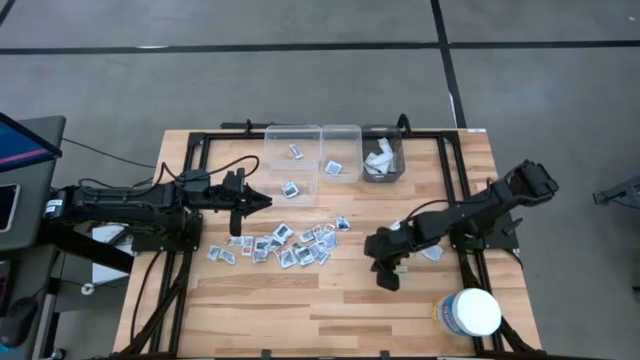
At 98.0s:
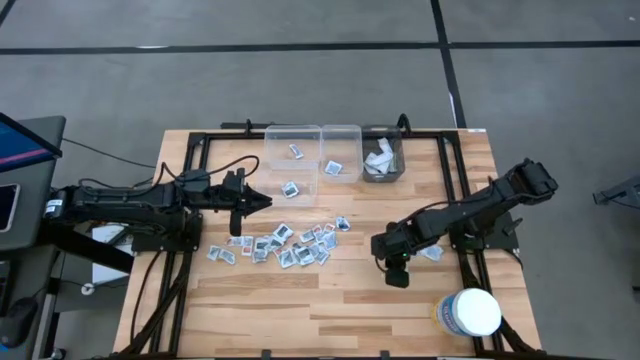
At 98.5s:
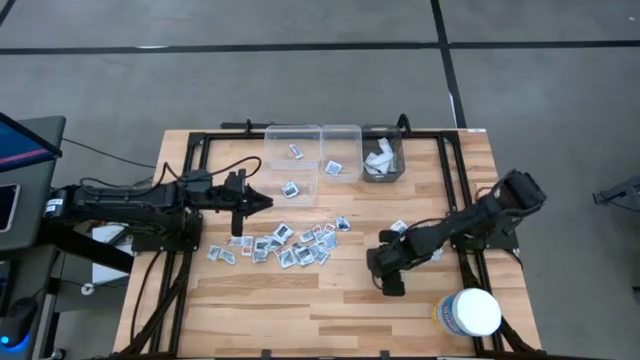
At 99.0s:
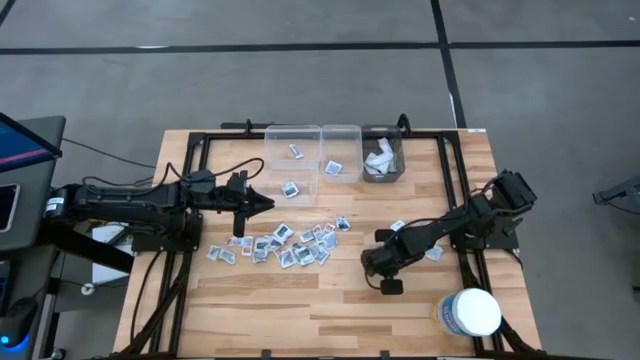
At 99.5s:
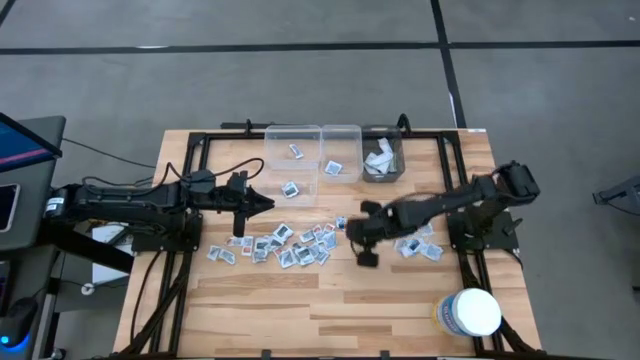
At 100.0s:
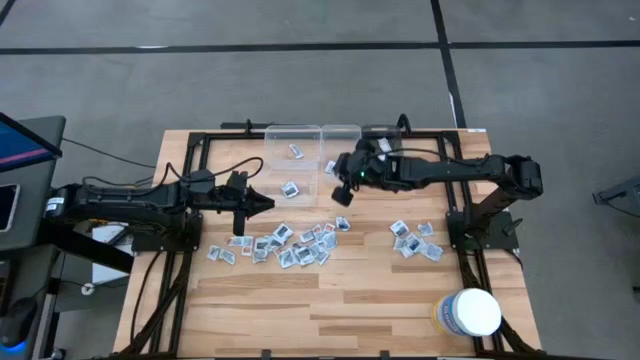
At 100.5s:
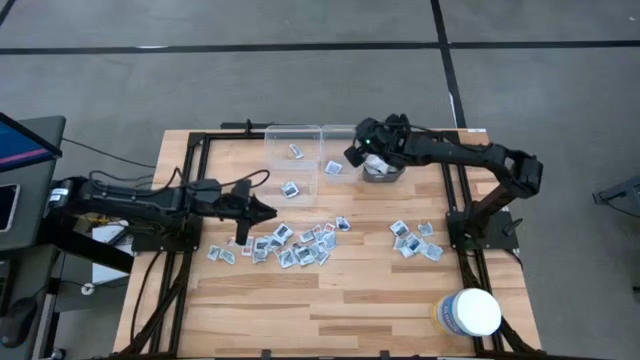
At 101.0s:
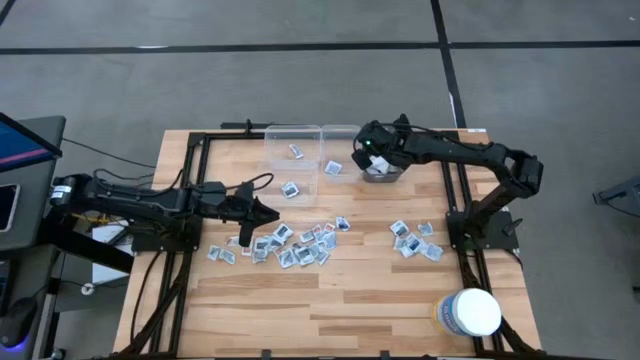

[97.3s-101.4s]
Task: Pick & Place First Aid Supplies
Put the bandage pack into the black transparent bin

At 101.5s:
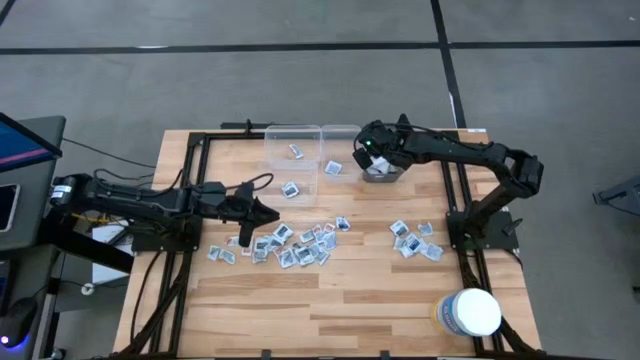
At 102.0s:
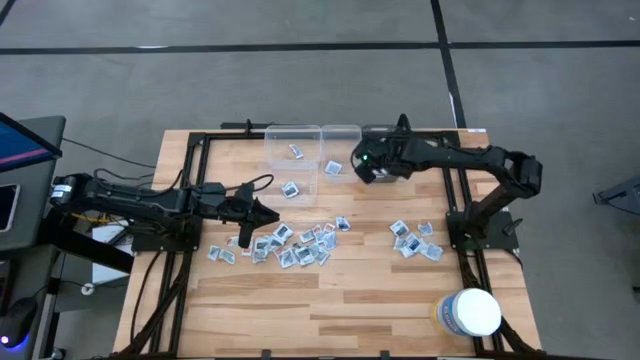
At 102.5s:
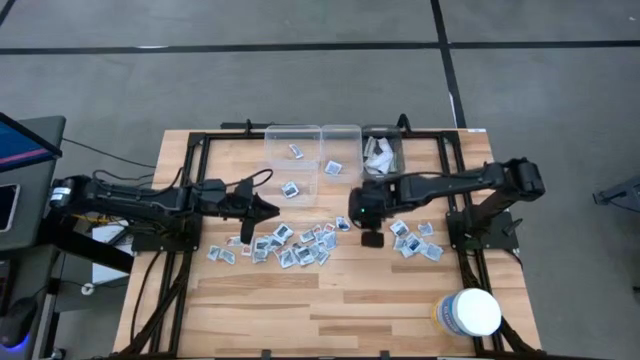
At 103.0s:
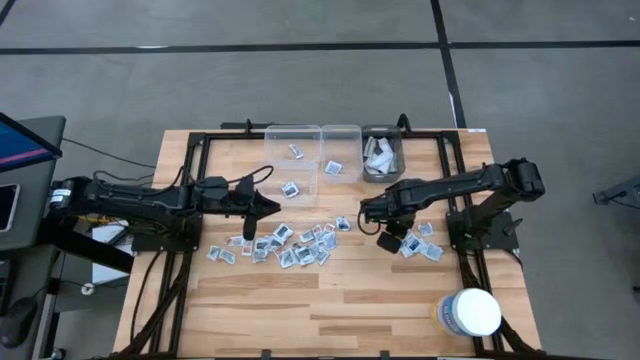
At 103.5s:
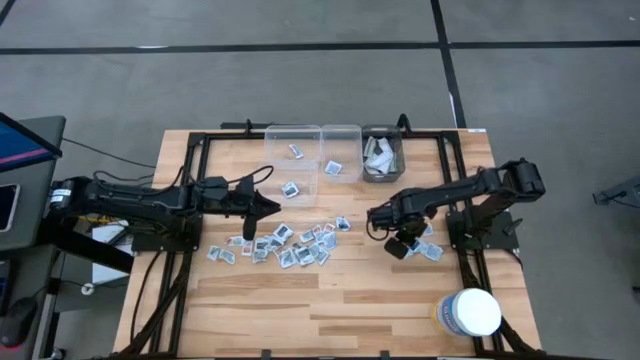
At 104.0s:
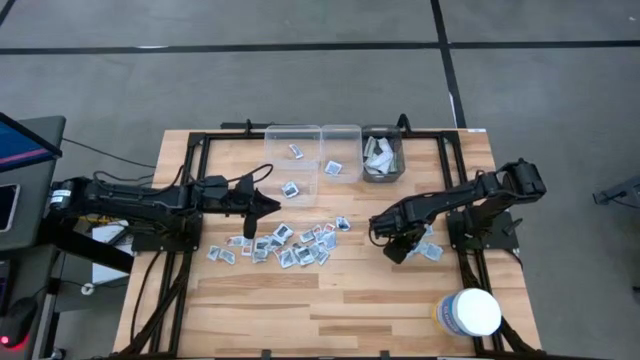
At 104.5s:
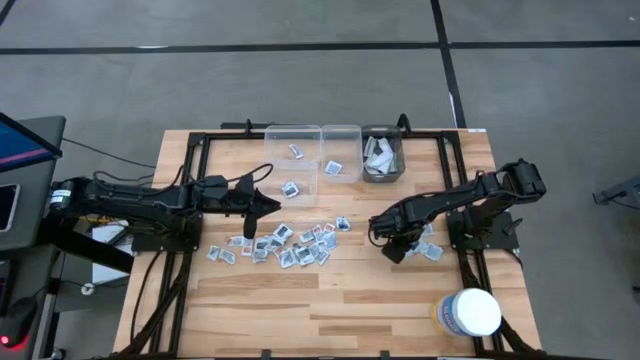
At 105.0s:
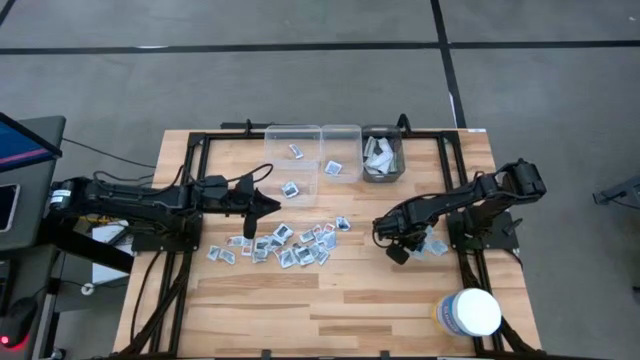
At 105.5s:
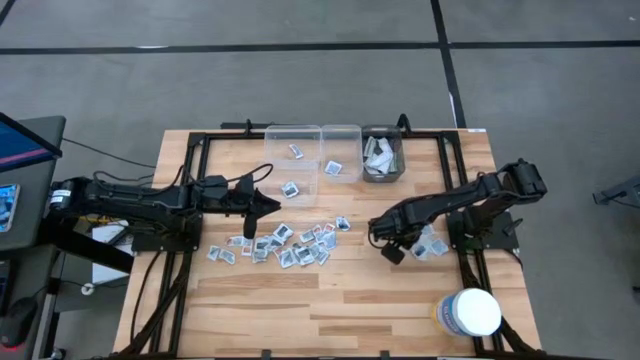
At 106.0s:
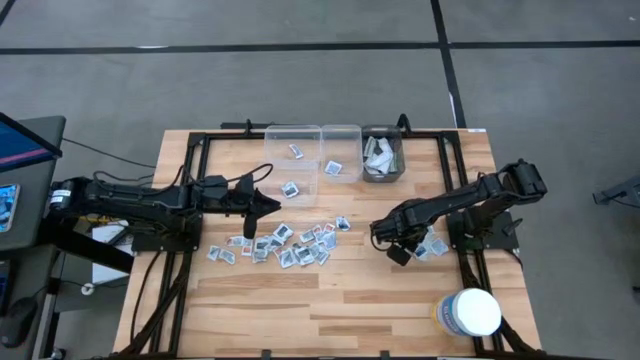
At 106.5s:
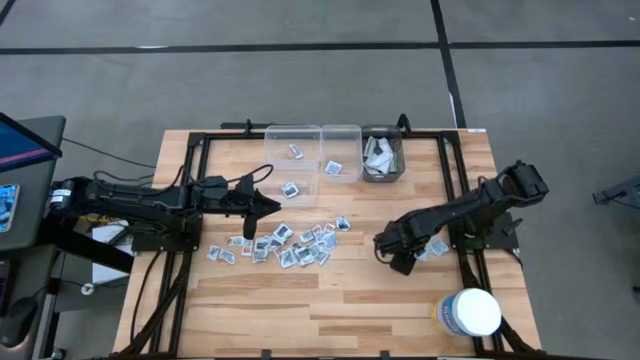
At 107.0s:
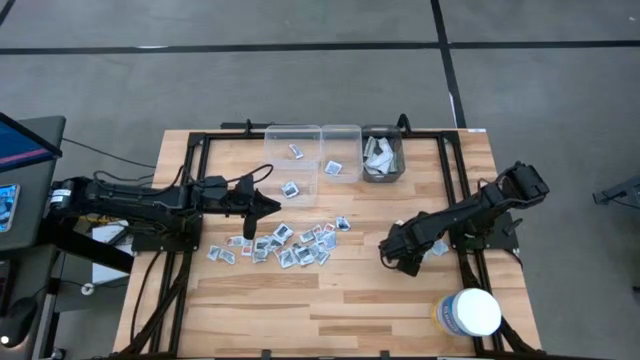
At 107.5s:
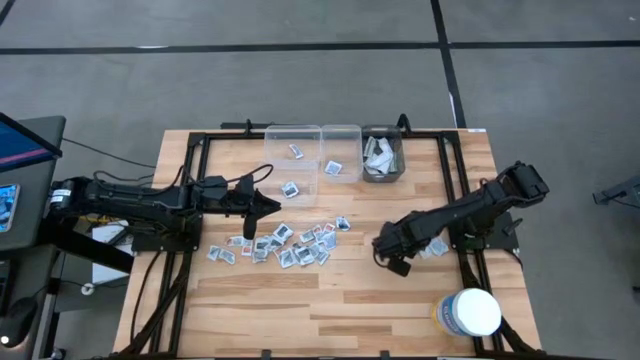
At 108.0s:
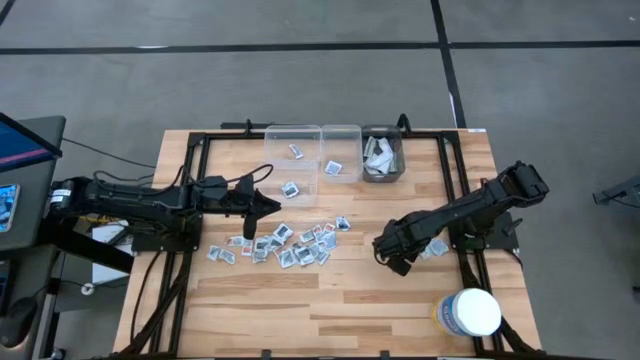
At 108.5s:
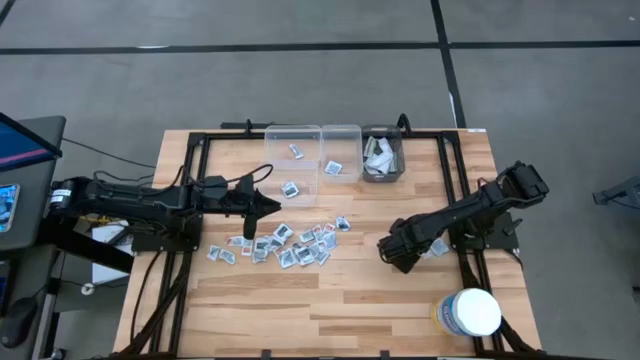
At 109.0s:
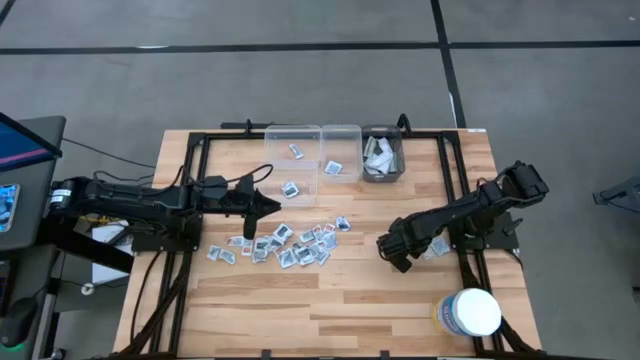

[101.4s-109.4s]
Put the alcohol pad into the top right transparent bin

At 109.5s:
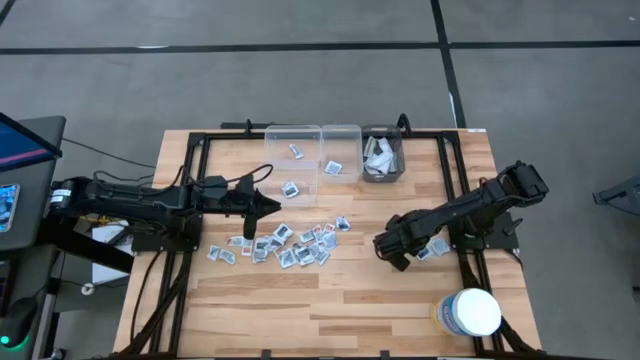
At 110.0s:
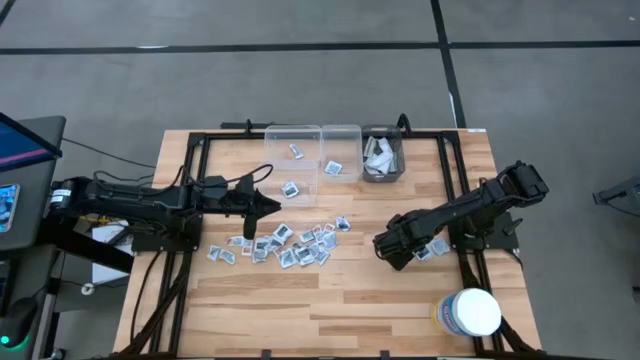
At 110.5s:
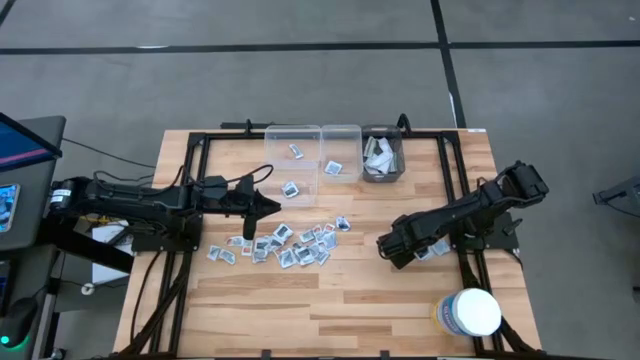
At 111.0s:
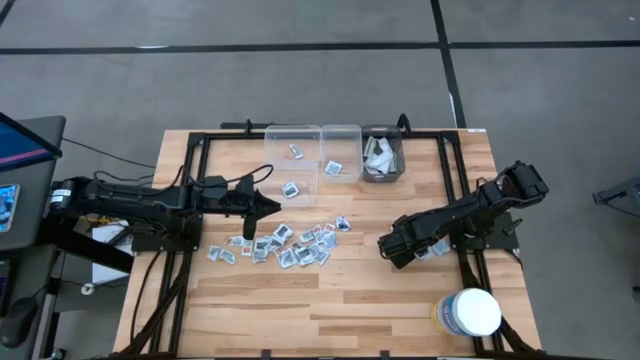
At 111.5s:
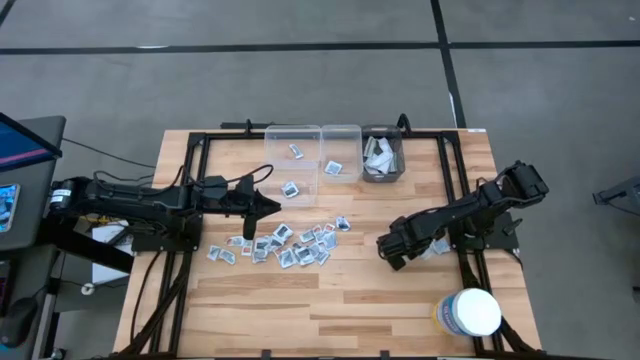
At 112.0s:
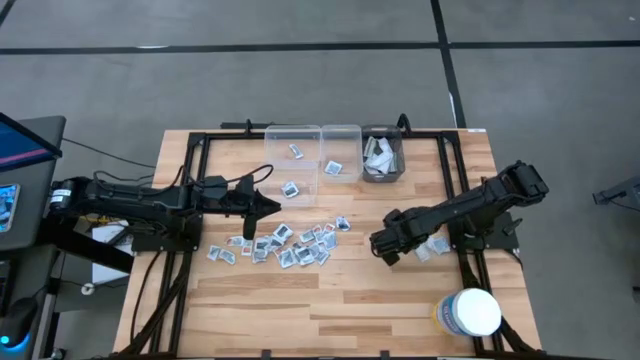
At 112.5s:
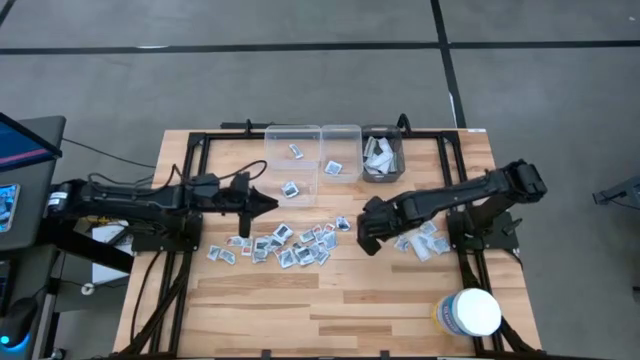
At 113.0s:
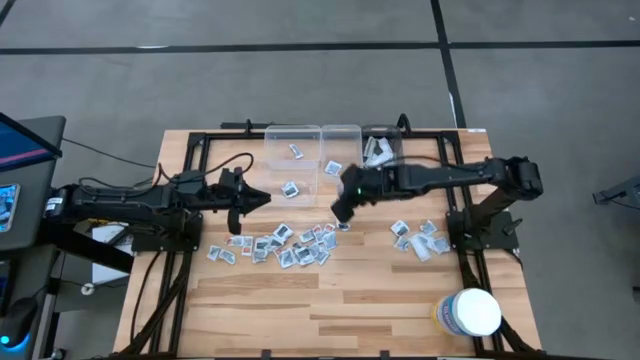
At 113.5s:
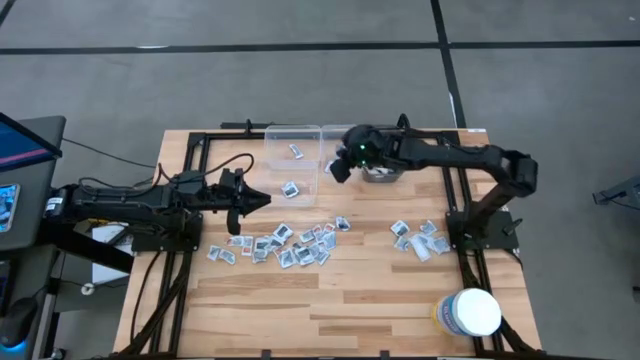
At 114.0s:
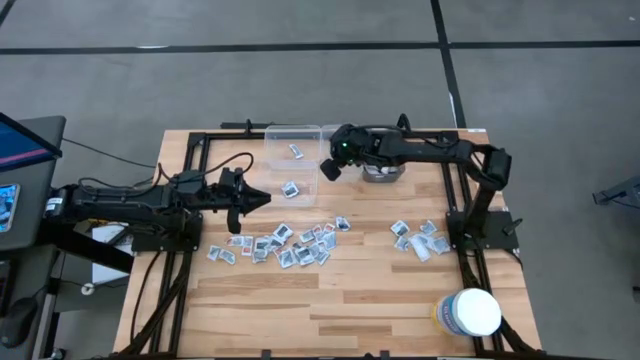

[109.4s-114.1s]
Put the alcohol pad into the top right transparent bin

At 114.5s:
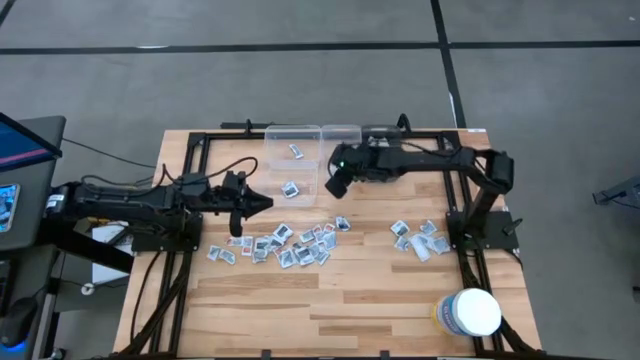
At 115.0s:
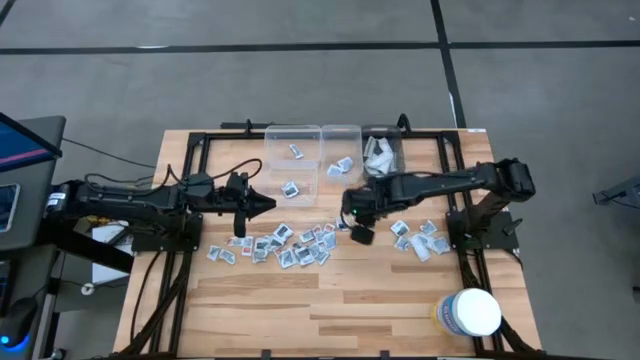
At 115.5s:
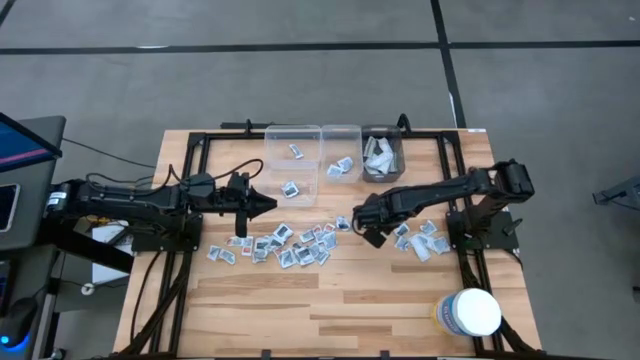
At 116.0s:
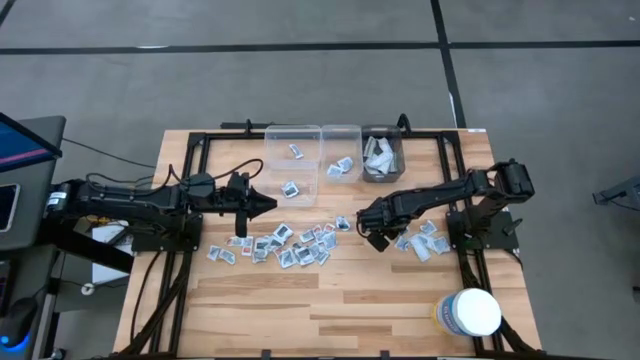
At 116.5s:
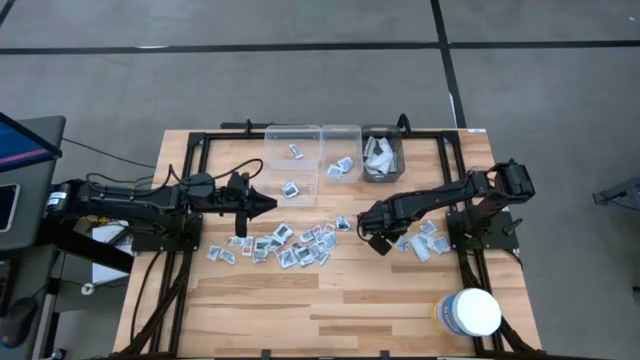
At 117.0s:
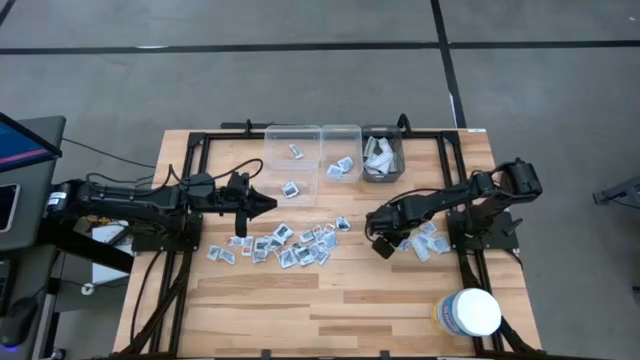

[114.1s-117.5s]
Put the towelette pack into the bottom transparent bin
